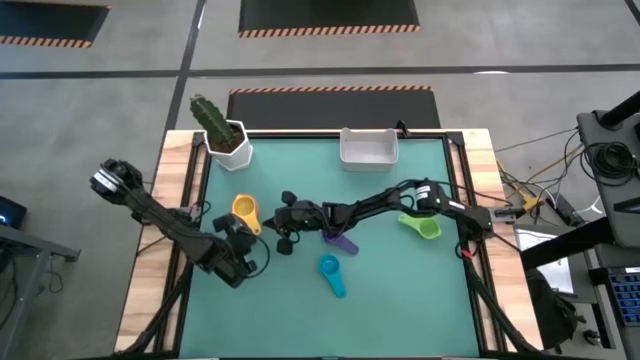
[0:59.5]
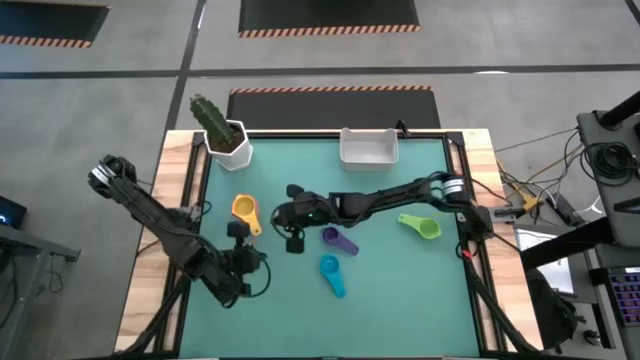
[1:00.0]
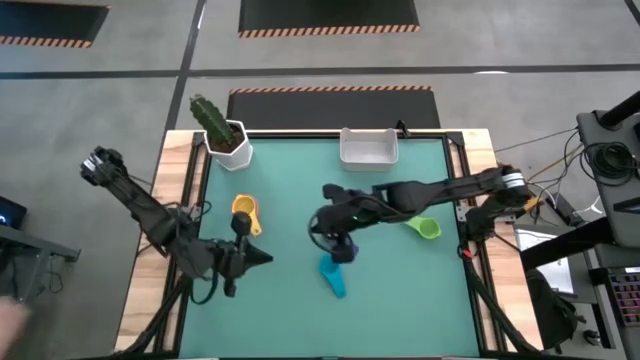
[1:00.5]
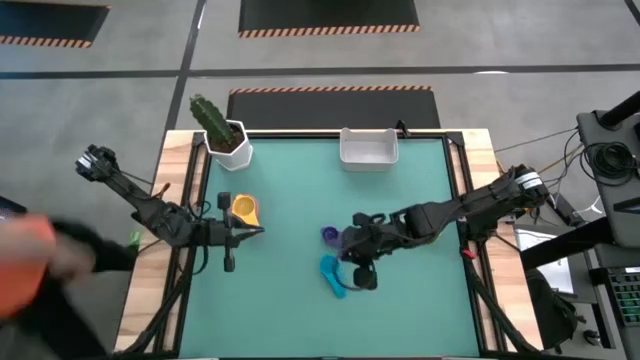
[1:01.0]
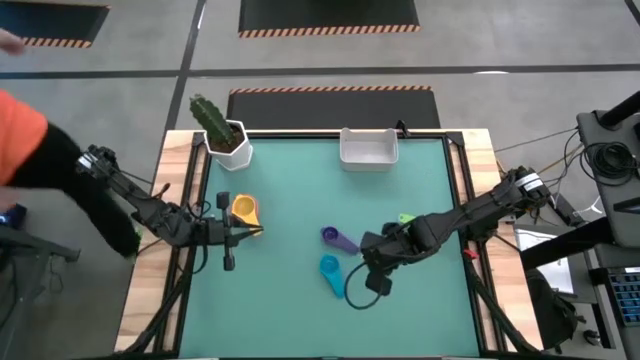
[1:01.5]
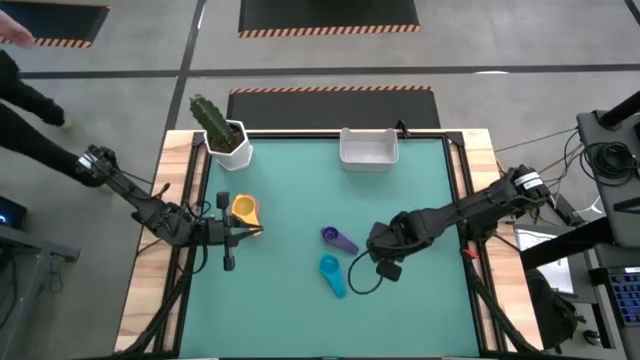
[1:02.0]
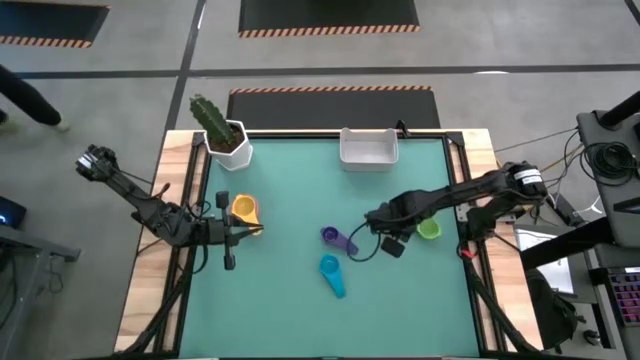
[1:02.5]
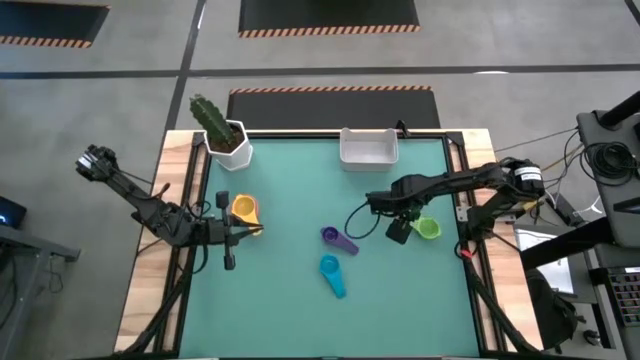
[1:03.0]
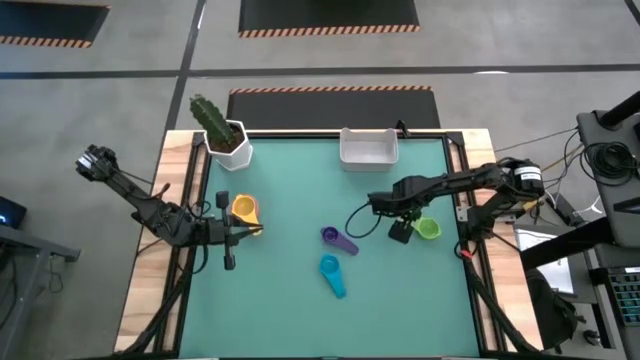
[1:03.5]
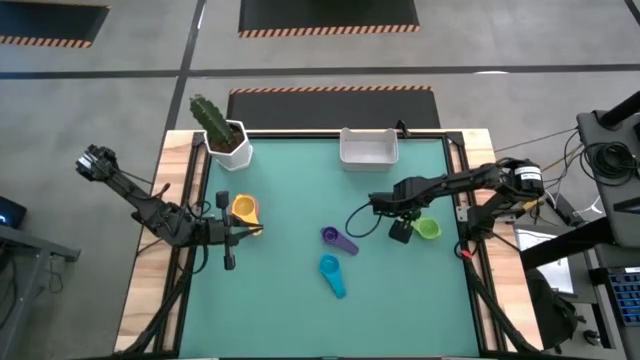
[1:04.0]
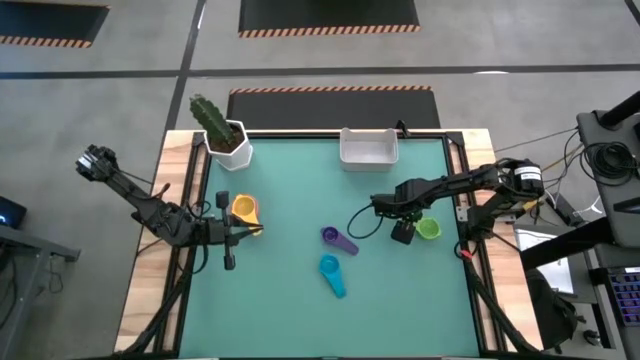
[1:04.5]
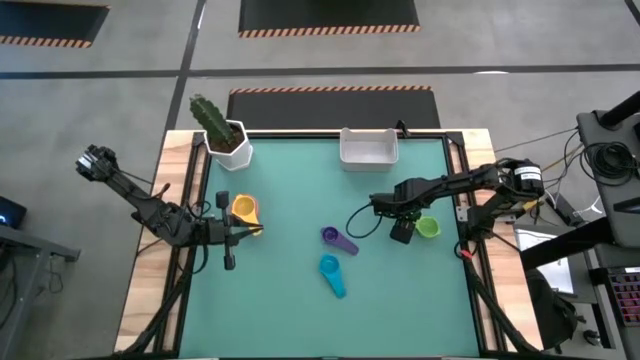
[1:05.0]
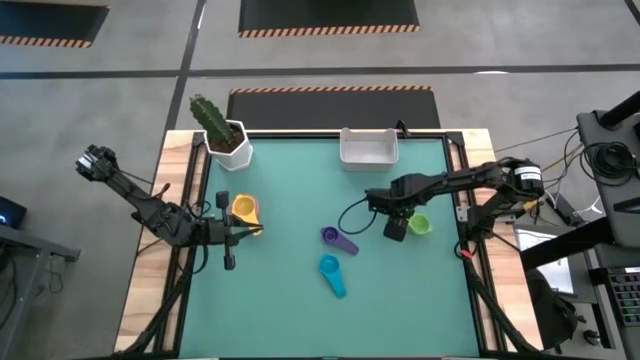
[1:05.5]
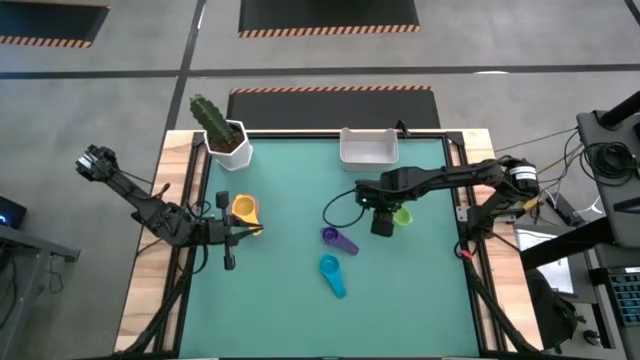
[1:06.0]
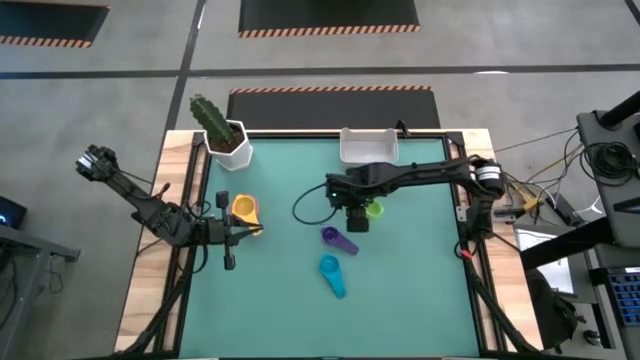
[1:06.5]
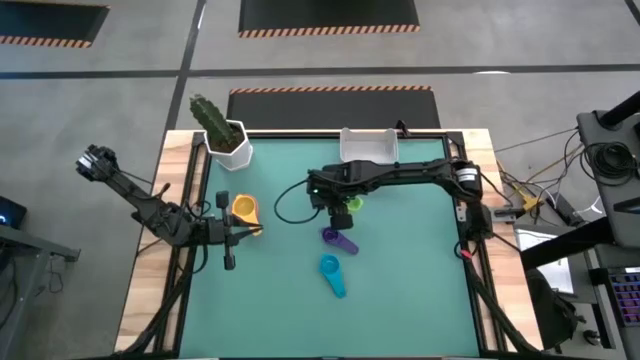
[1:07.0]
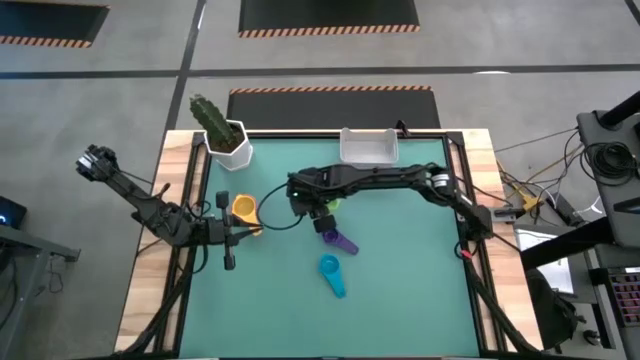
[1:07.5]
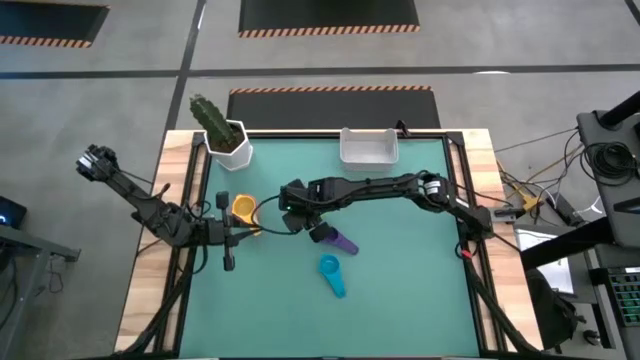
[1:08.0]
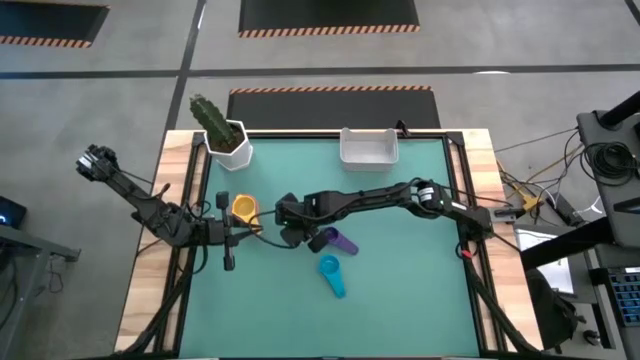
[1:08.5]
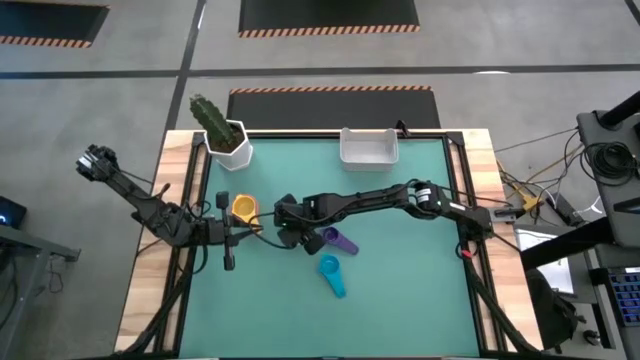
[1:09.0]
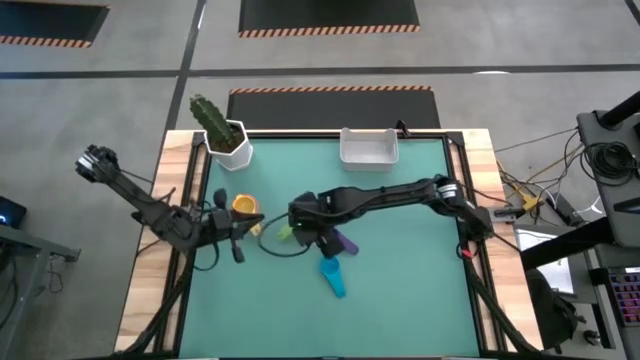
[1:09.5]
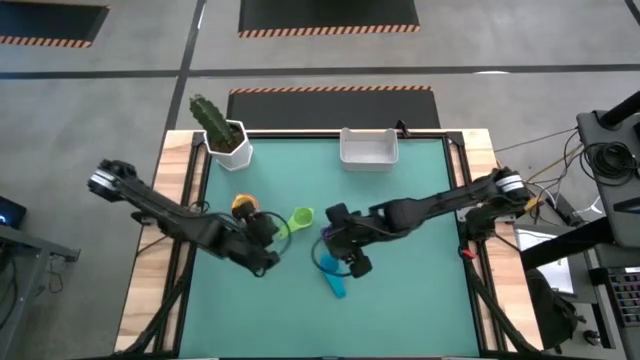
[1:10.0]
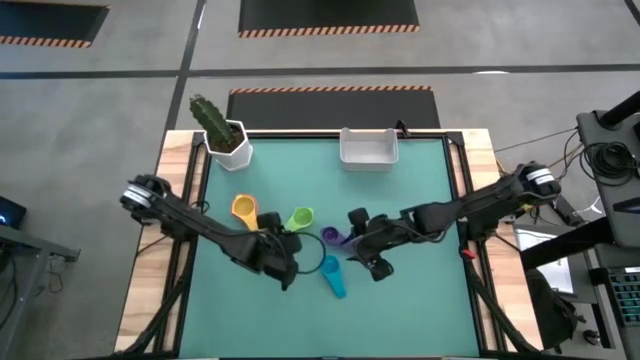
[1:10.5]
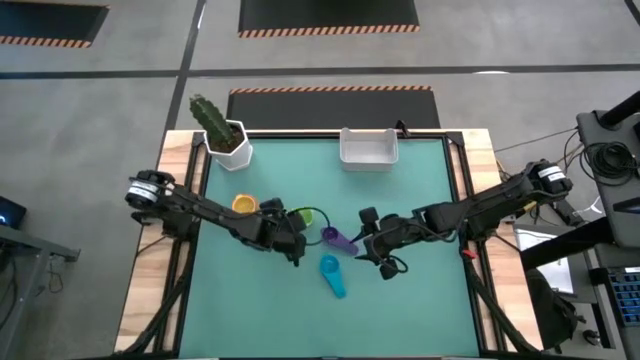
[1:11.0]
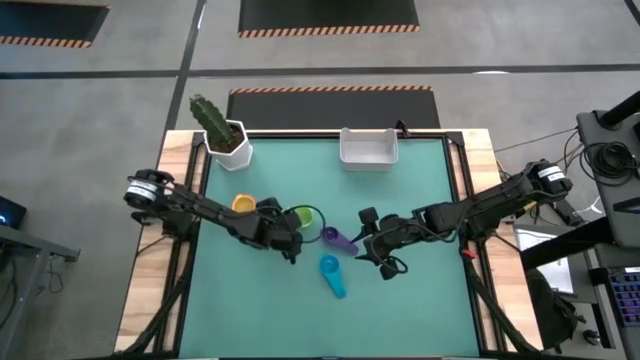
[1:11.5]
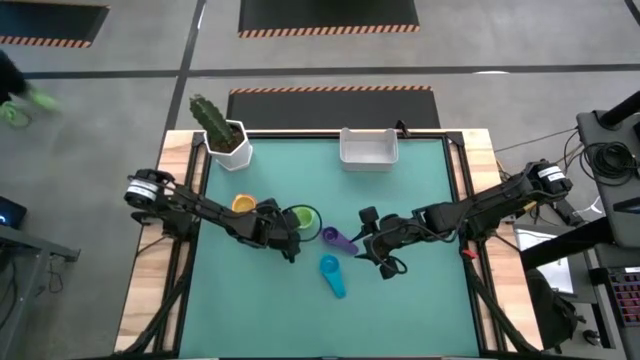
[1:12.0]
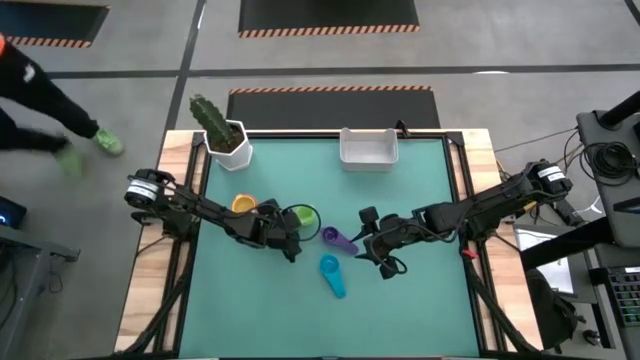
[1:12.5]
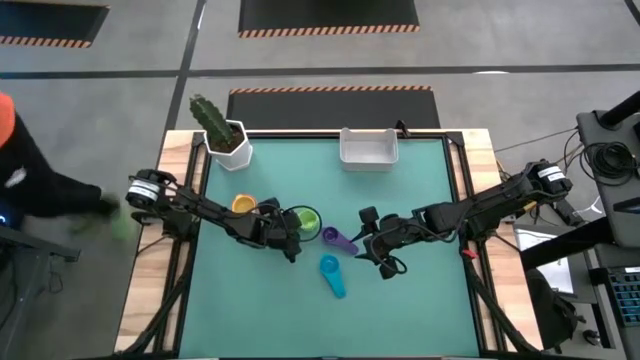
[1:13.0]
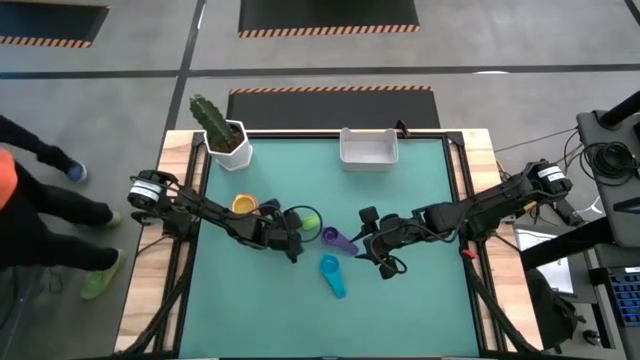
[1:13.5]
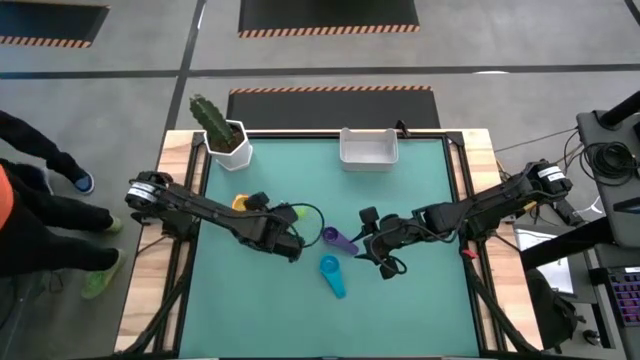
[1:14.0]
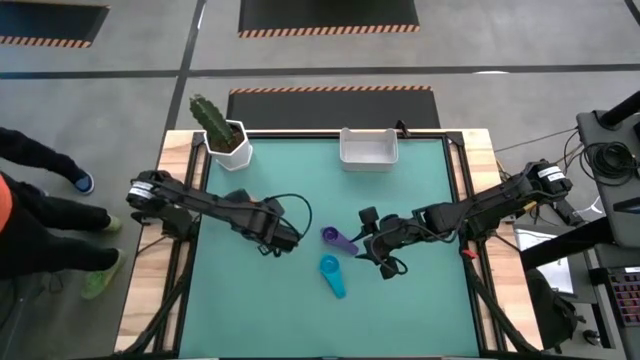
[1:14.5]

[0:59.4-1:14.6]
Task: Nest measuring cups in basket
Stack the green measuring cup on top of the yellow measuring cup
